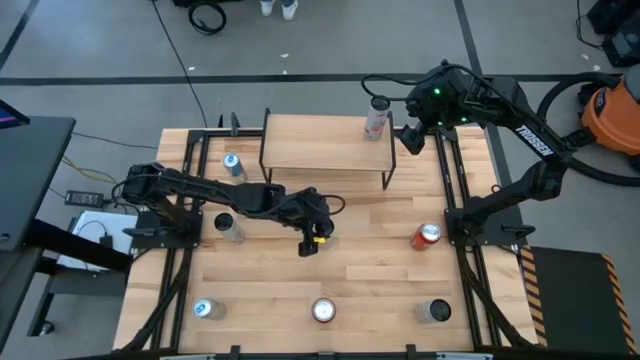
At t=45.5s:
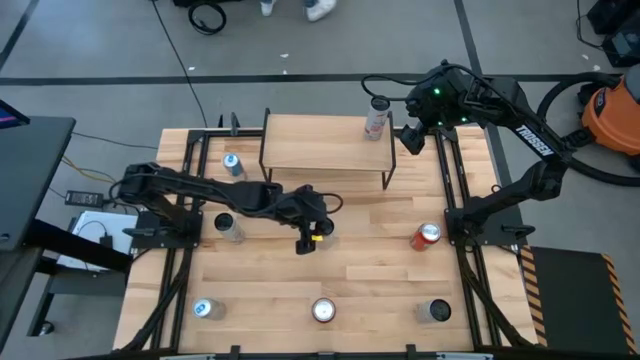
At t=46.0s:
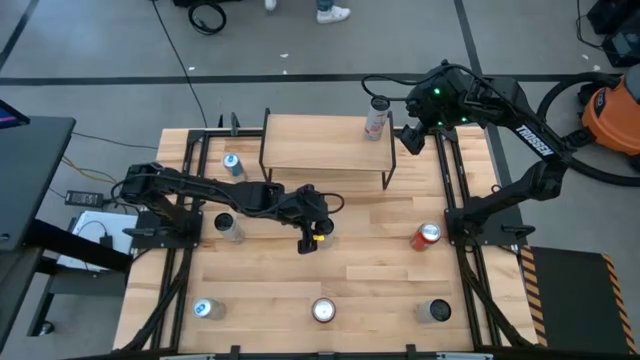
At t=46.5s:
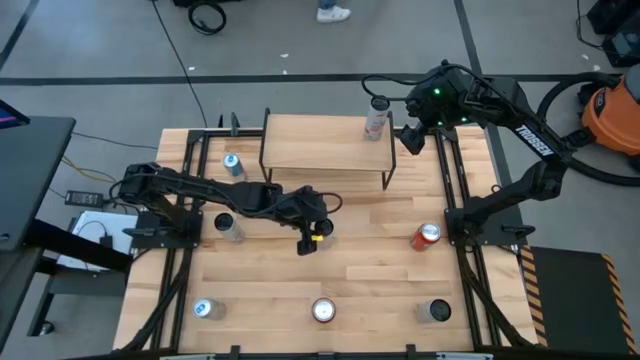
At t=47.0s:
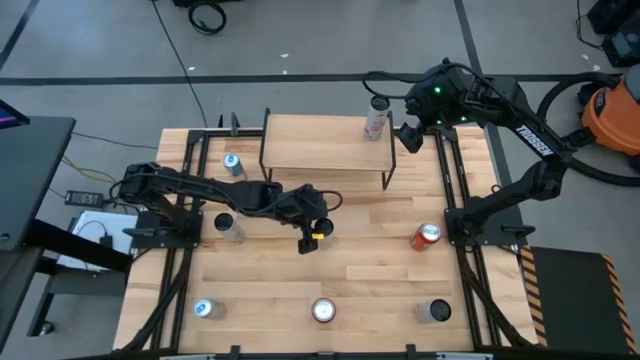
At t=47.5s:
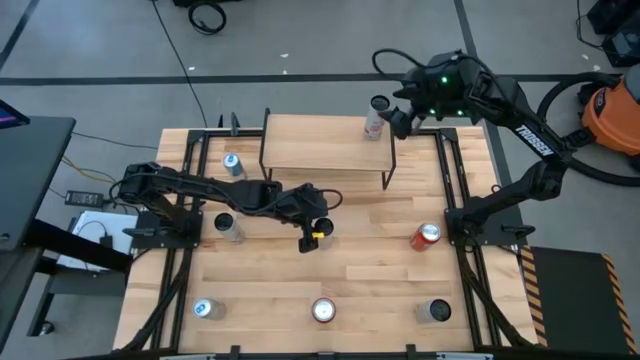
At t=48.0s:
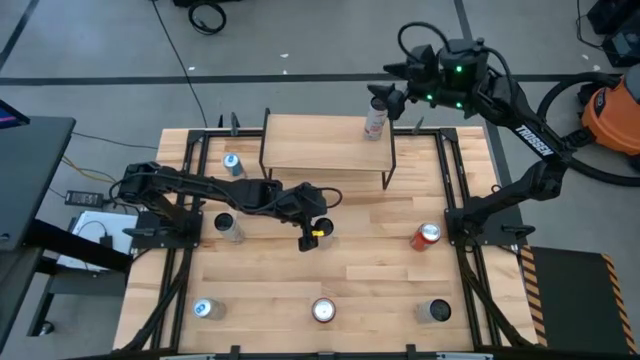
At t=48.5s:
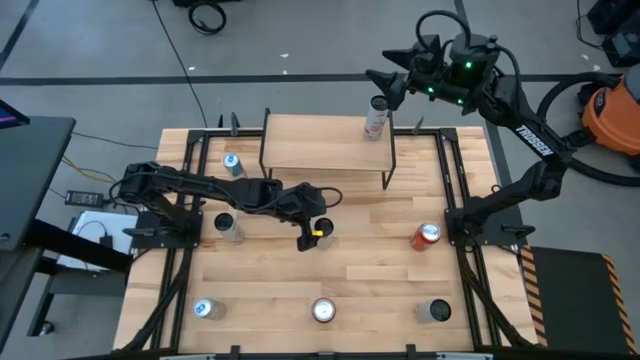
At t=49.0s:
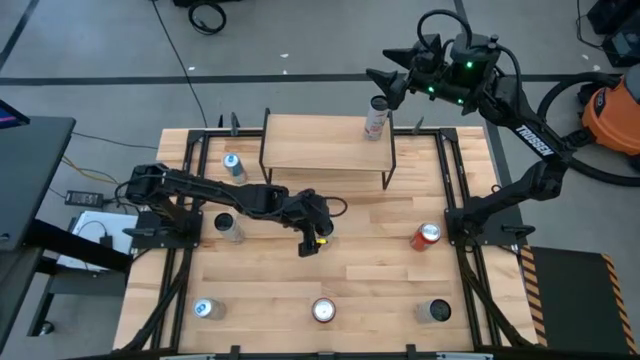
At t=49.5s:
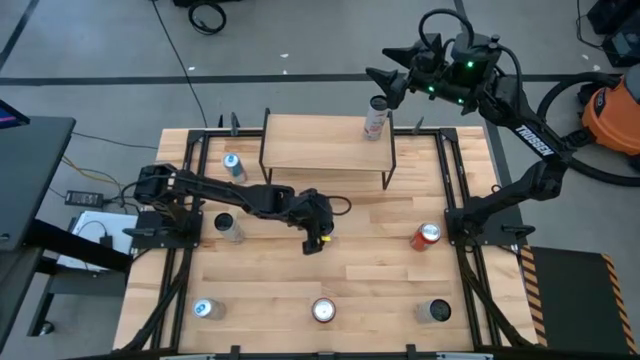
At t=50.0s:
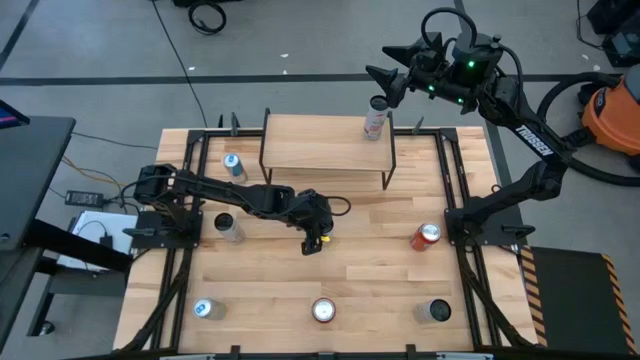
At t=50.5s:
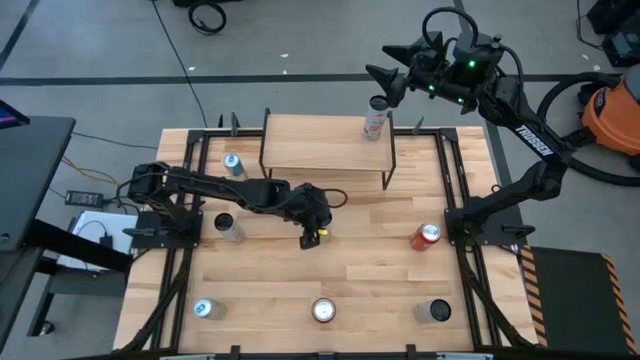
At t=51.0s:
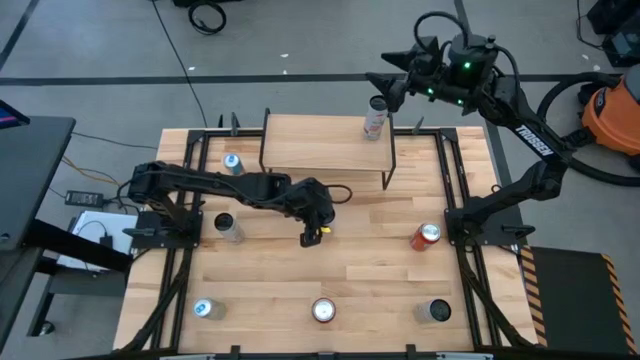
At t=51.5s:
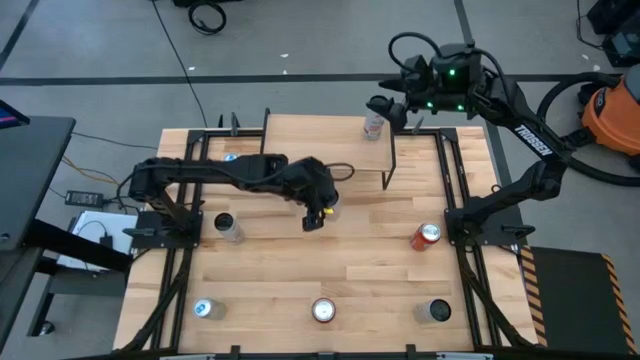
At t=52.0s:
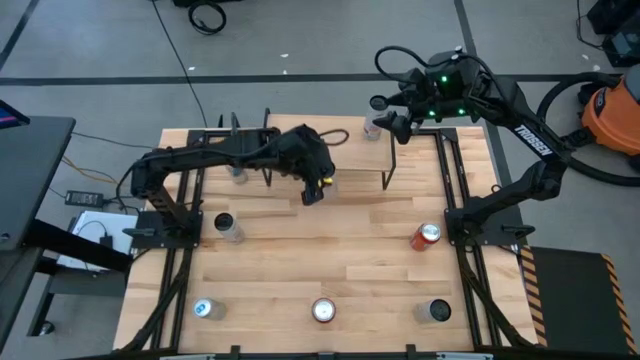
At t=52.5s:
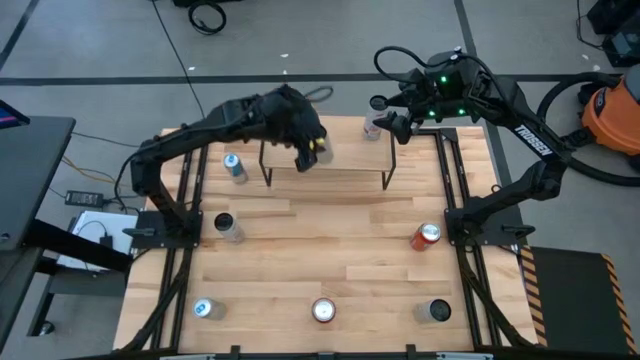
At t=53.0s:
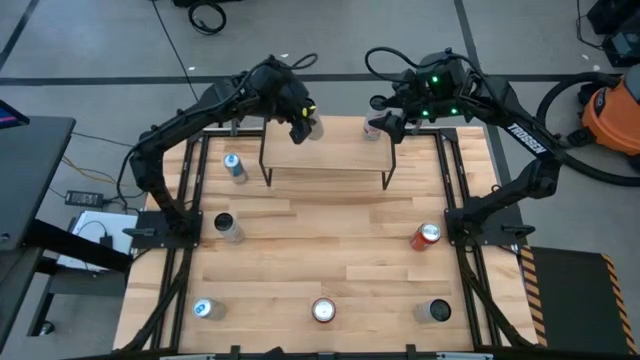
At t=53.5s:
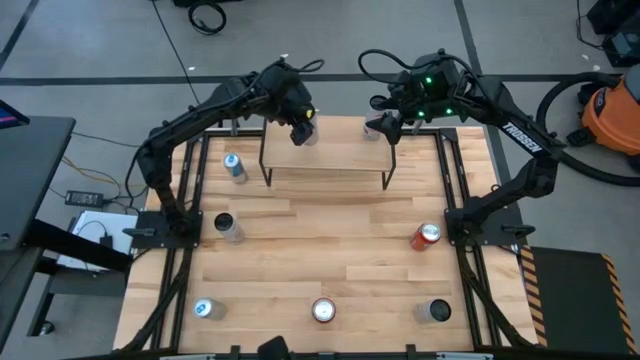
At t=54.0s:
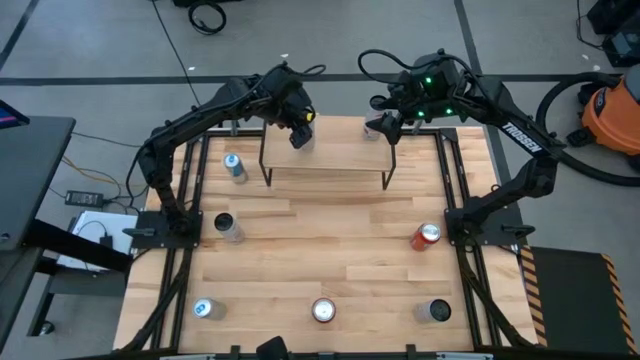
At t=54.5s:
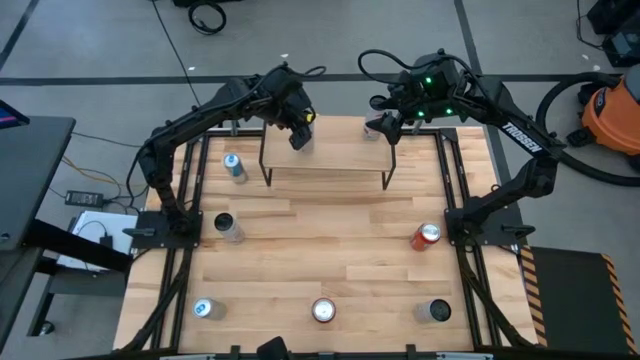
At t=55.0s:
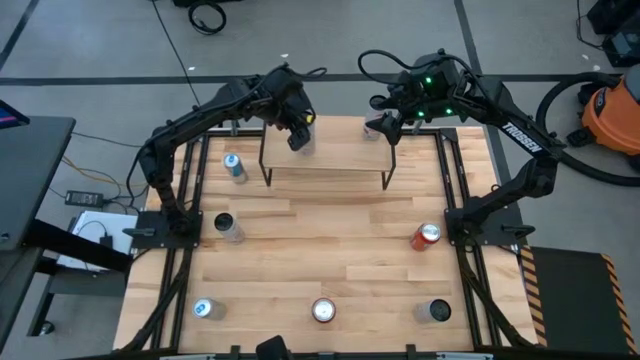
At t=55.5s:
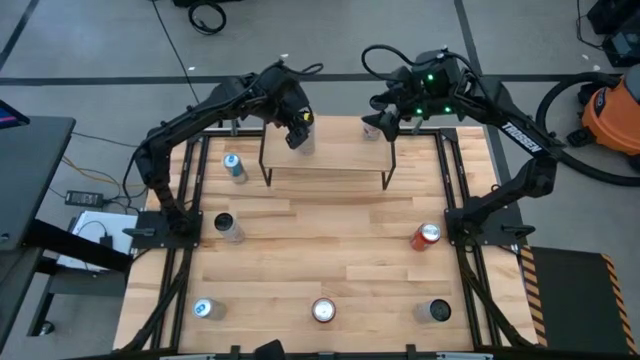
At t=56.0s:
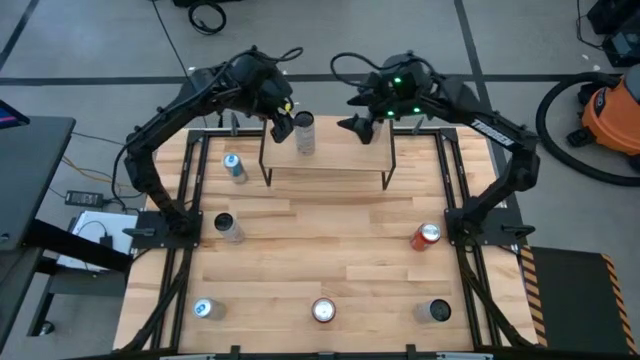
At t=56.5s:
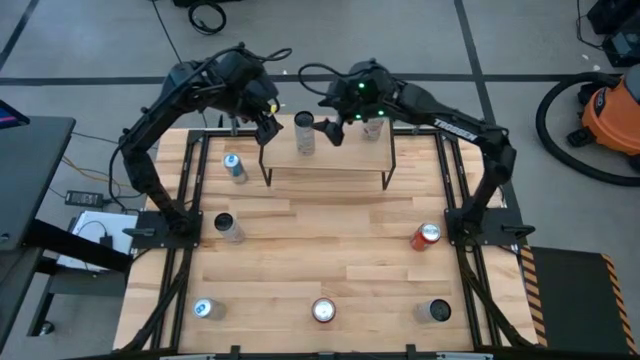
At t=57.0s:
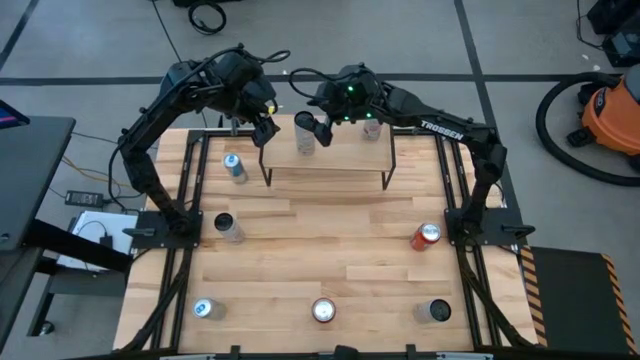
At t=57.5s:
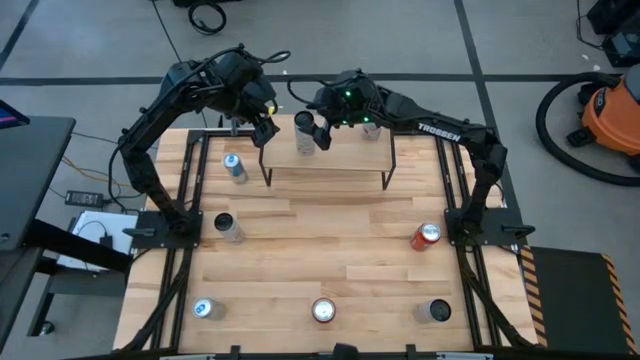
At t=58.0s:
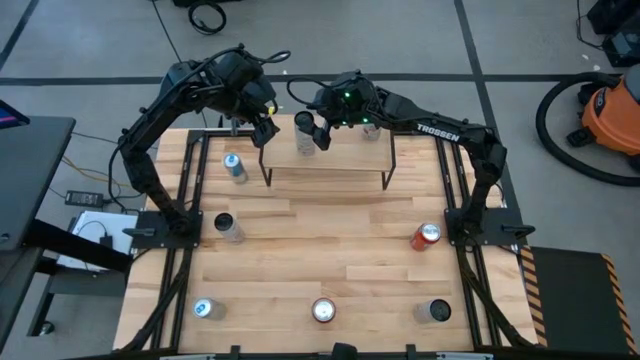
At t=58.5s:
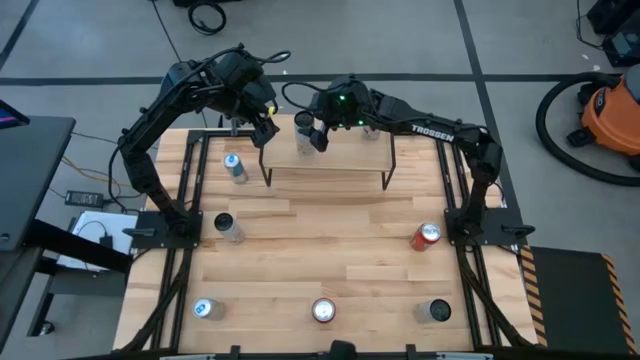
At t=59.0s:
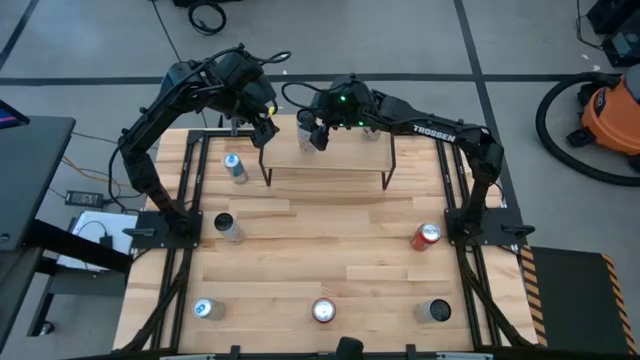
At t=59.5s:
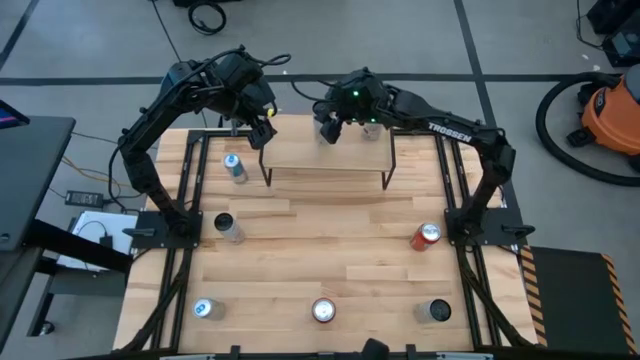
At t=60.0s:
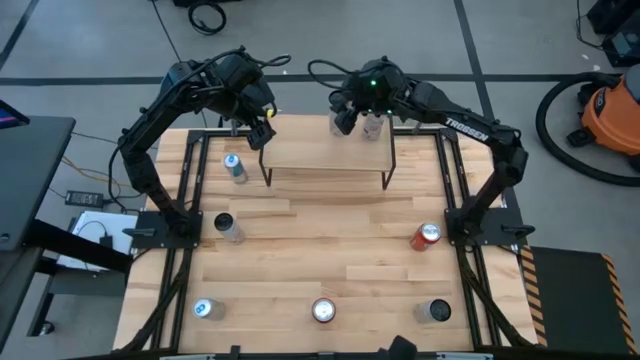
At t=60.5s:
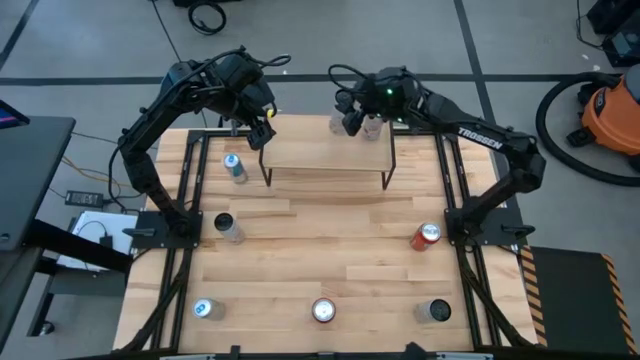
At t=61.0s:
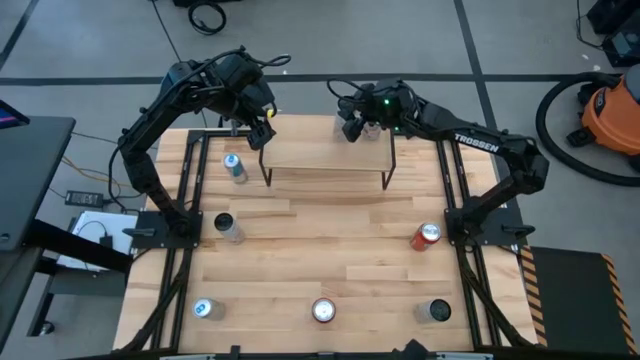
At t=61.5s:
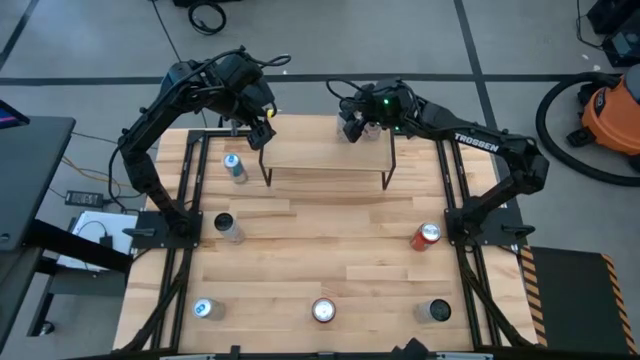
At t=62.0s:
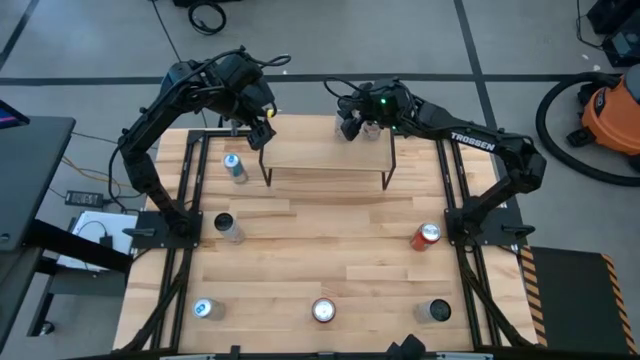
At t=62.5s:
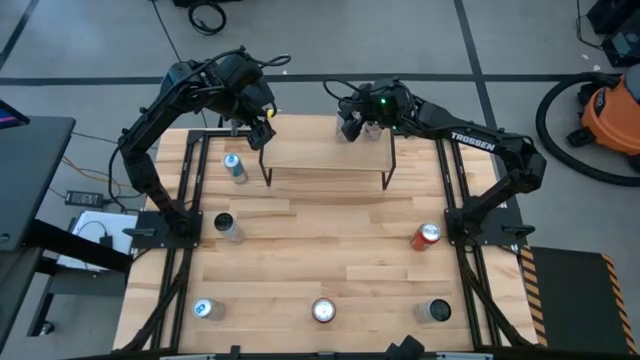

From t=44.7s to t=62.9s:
Task: Place canned beverage on shelf
Put the top white yellow soda can on the shelf
